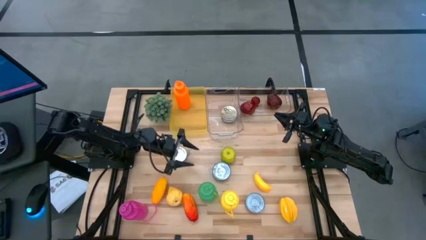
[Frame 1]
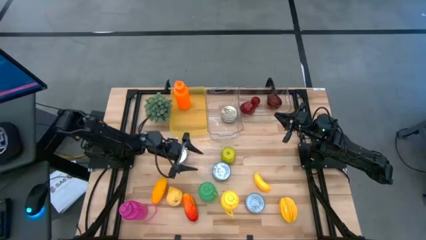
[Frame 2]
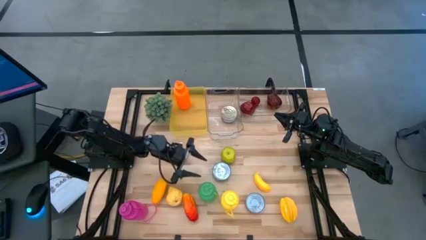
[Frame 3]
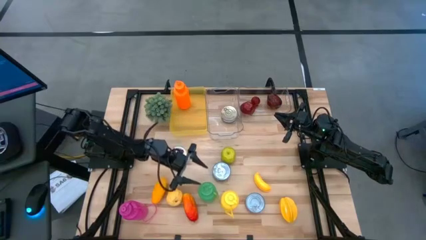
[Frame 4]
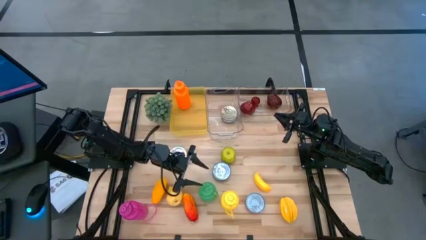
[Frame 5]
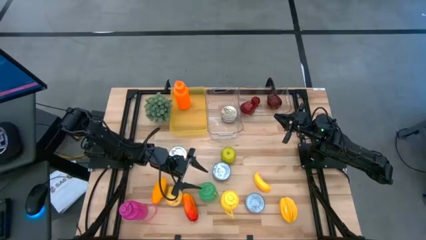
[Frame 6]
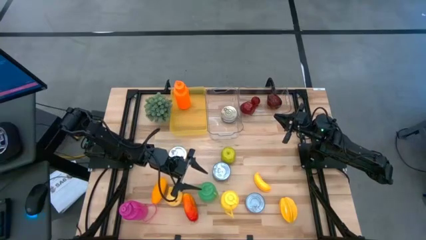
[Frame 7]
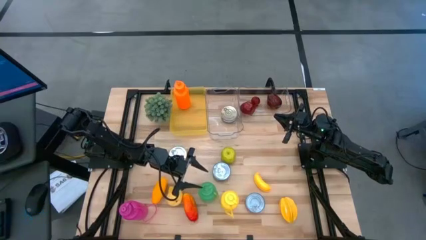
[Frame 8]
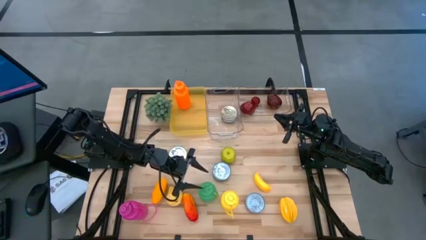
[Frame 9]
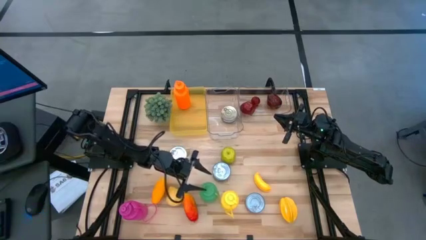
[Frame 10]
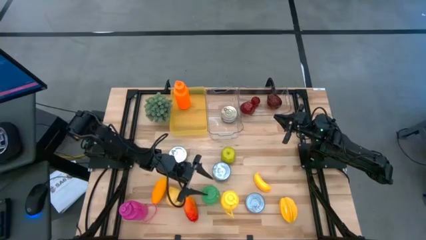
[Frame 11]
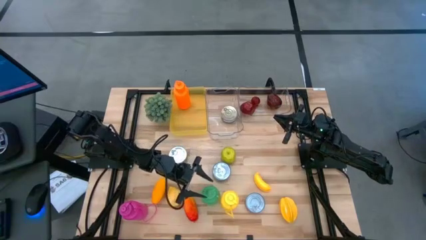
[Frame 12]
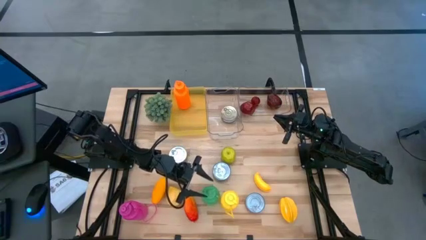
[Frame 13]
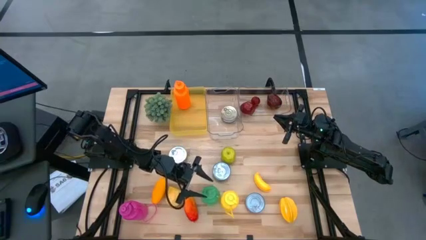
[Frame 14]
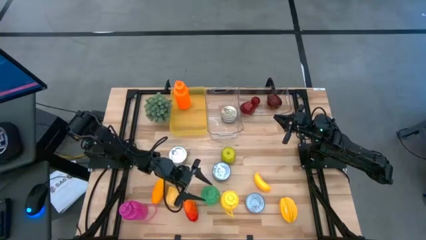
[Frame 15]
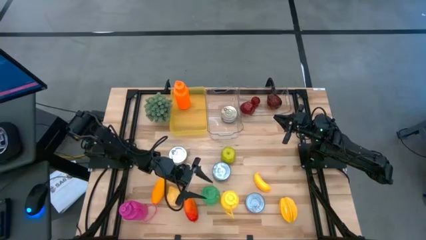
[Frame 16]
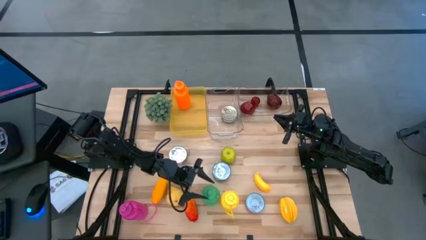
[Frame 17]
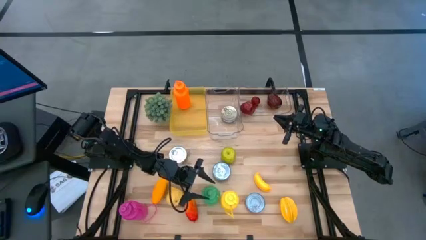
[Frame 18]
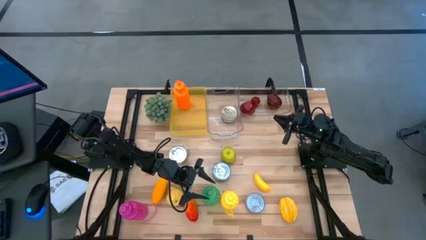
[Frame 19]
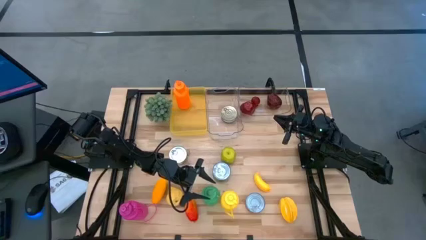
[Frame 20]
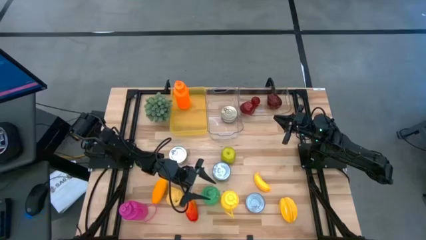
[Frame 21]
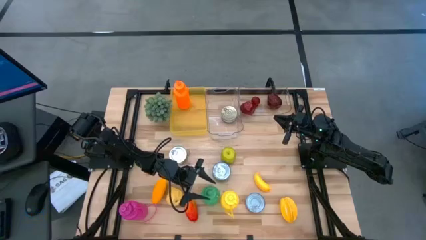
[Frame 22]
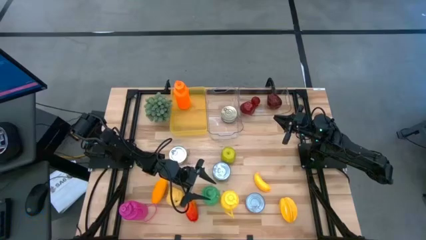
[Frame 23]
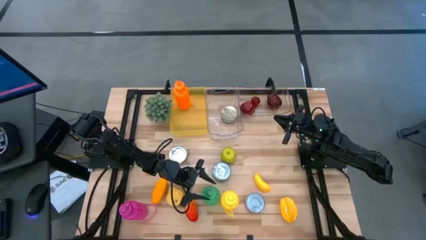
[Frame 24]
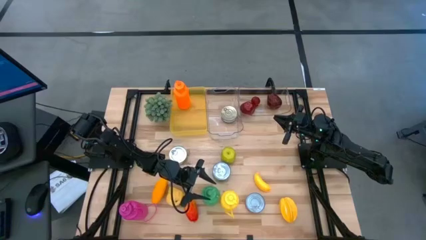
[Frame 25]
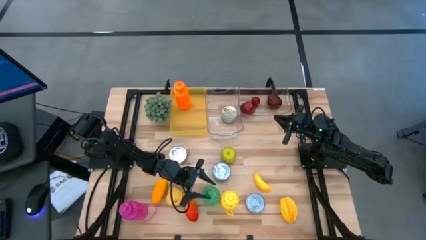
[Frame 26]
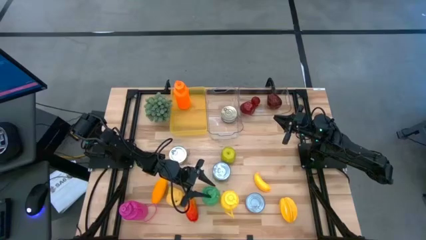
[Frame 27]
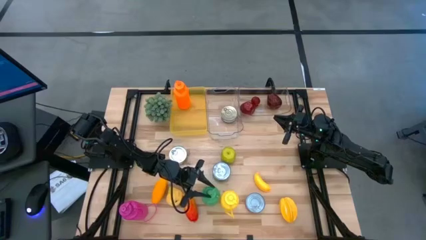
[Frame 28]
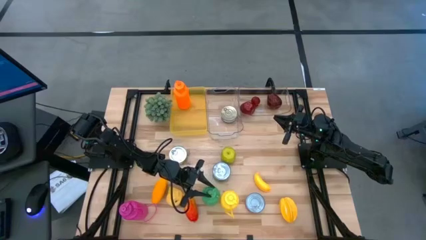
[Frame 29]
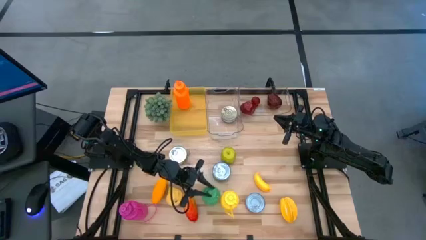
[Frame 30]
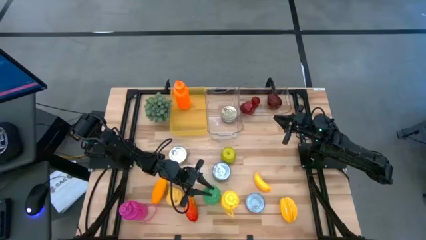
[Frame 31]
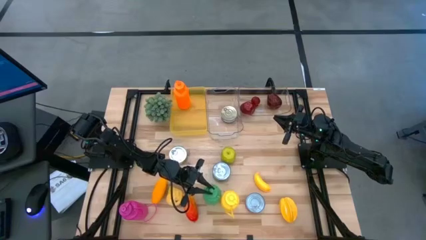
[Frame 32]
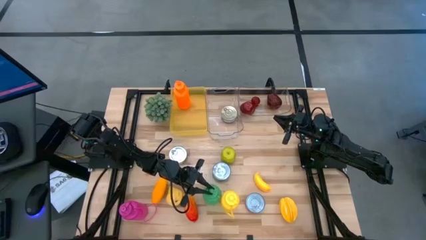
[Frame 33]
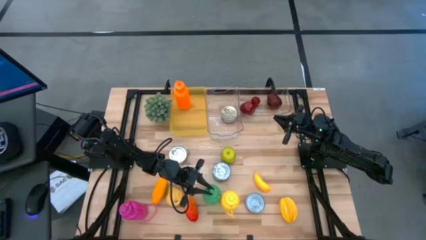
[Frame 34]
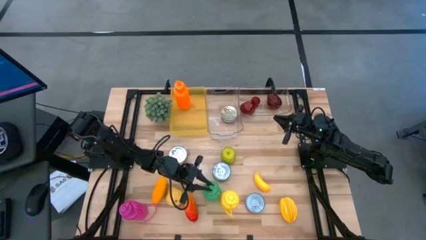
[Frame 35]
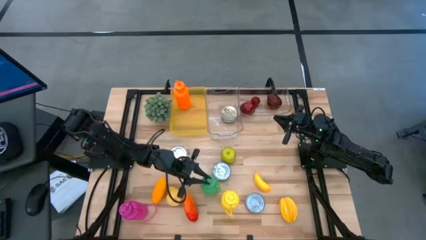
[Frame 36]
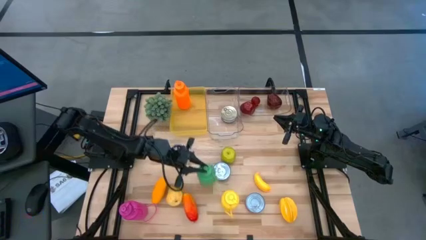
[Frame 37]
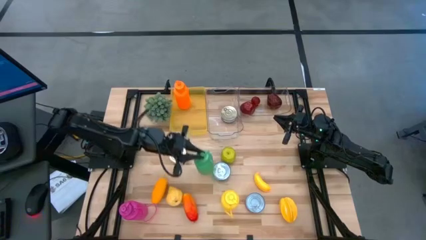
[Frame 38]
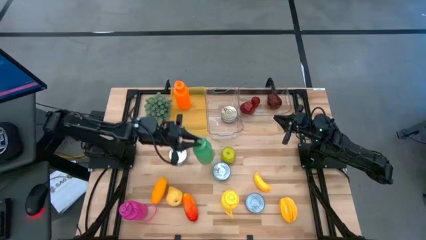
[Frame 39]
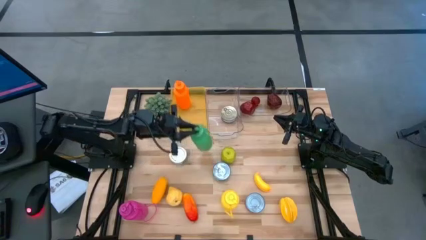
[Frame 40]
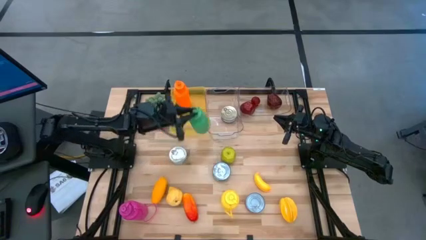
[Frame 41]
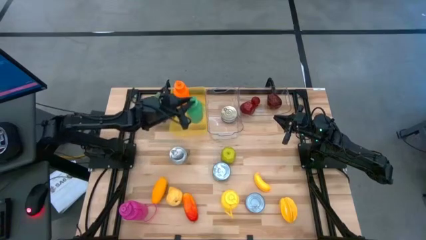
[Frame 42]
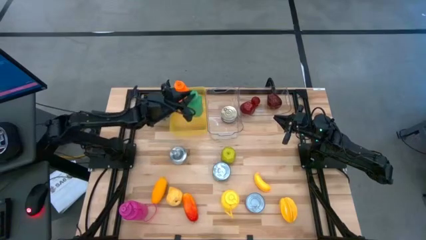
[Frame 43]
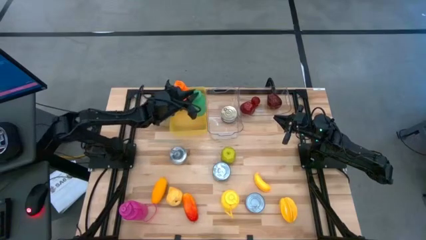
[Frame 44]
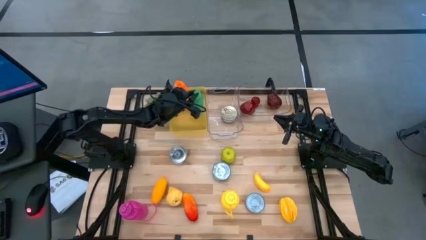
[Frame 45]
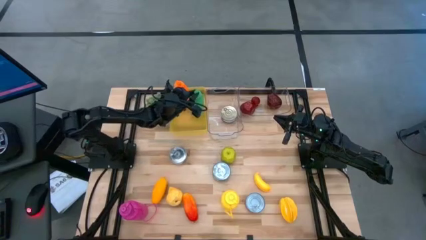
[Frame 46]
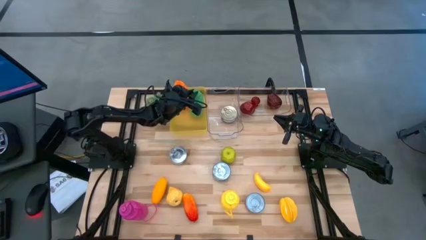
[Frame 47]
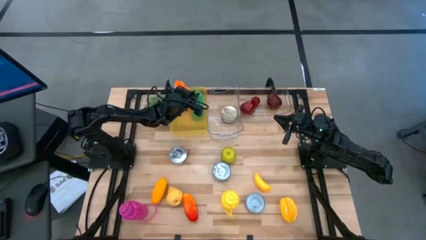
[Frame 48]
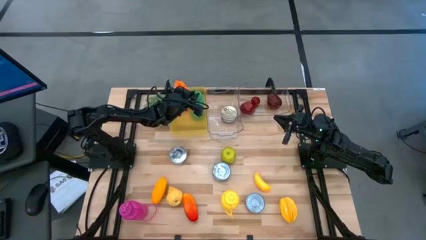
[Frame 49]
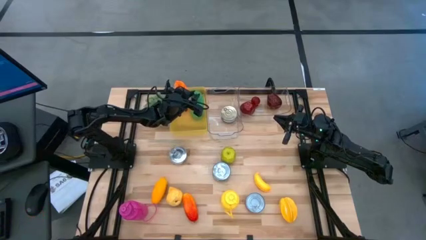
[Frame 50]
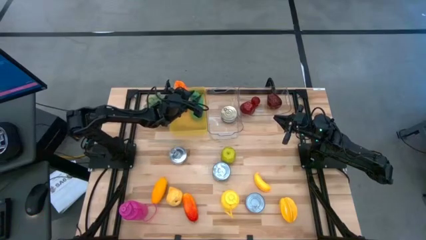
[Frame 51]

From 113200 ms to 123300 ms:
Task: Pick & Place Food Item
Put the green bottle into the yellow bin

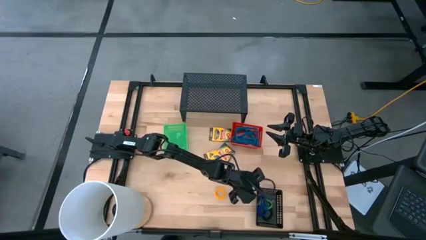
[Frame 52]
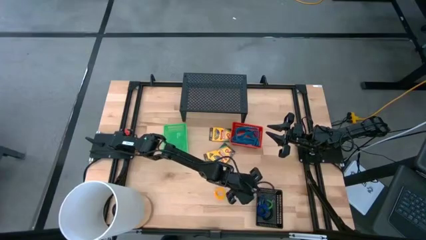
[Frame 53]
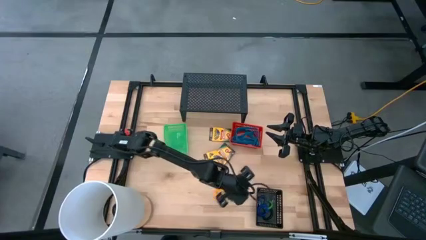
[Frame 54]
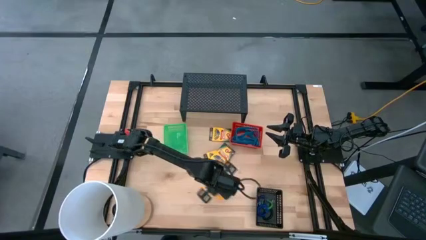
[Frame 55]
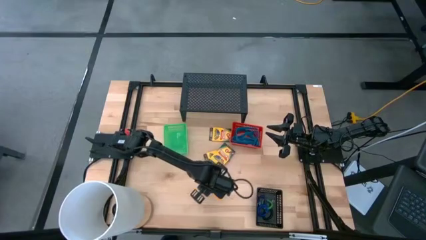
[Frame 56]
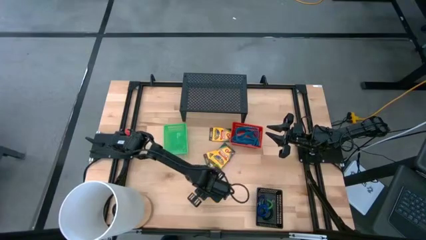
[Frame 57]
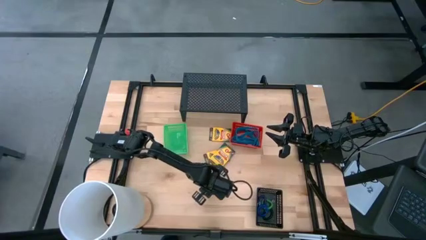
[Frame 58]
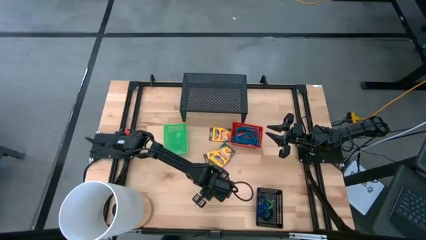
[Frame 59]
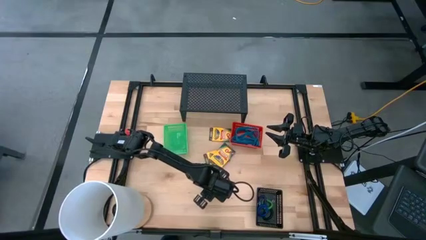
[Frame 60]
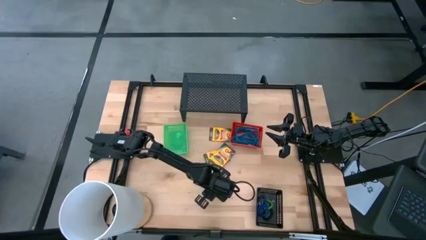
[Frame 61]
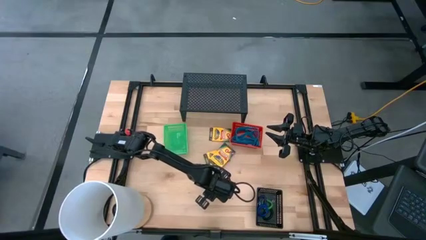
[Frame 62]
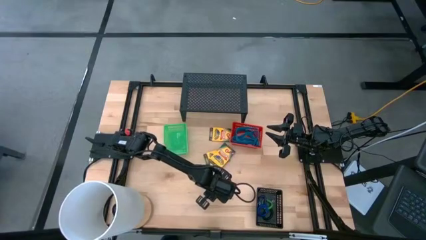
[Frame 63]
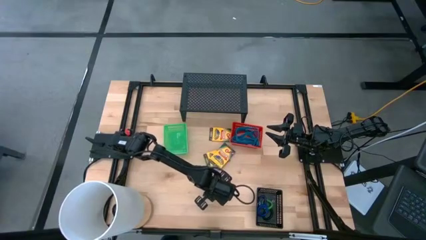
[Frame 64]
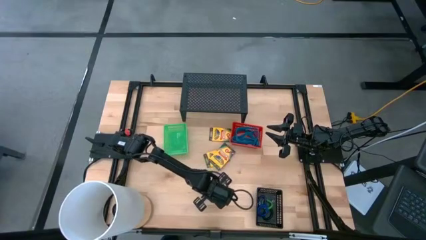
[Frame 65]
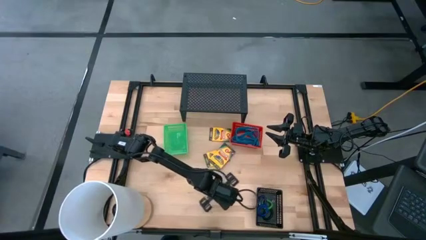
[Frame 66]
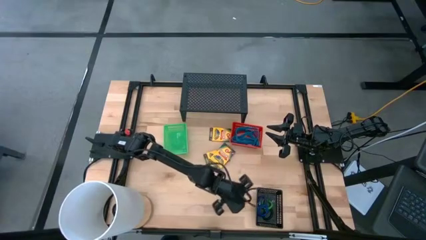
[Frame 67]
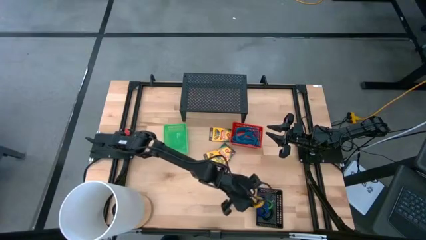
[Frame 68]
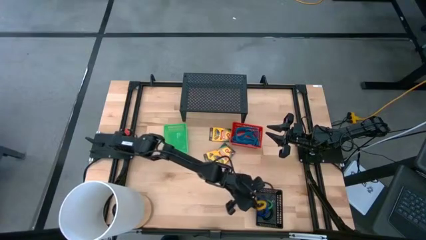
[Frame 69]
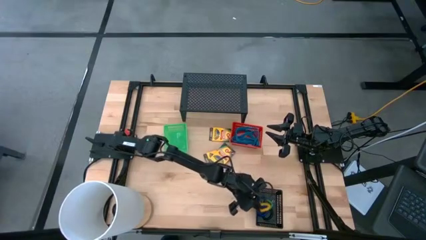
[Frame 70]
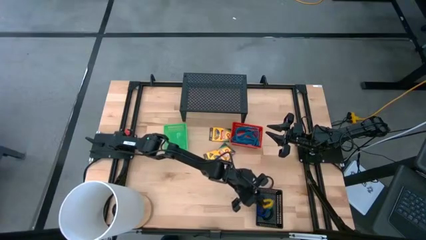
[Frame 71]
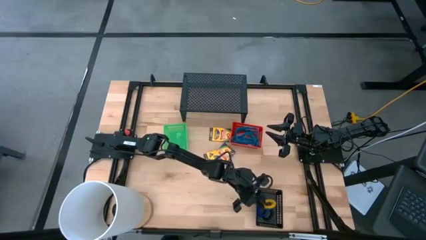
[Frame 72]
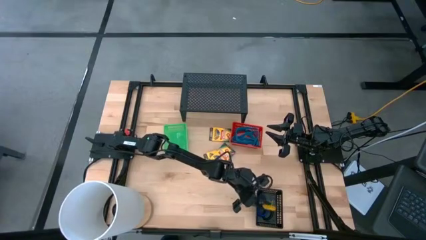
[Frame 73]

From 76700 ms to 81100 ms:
Task: Pick & Place Office Desk Supplies
Put the yellow spring keychain into the black bin
